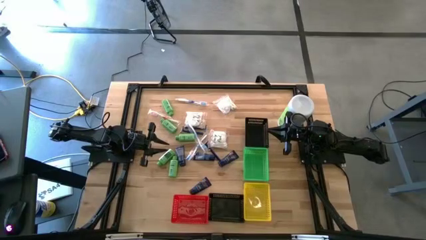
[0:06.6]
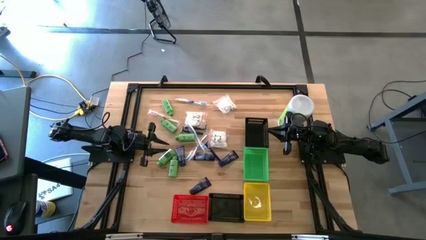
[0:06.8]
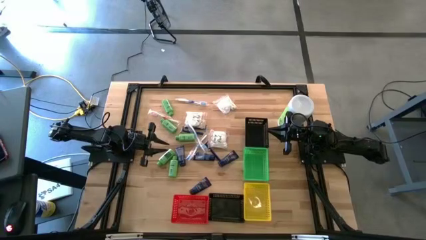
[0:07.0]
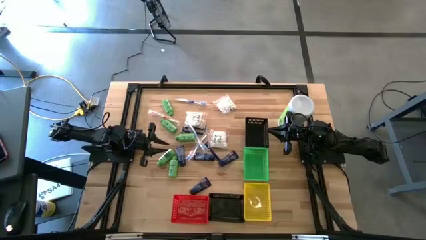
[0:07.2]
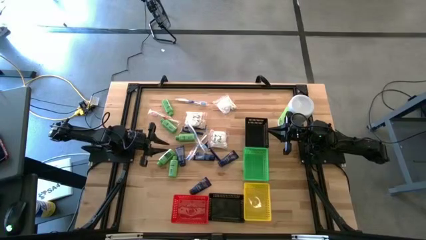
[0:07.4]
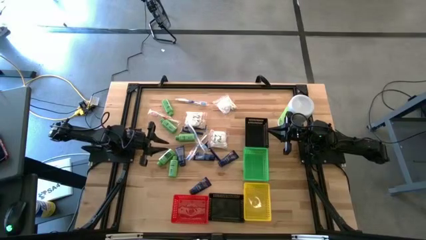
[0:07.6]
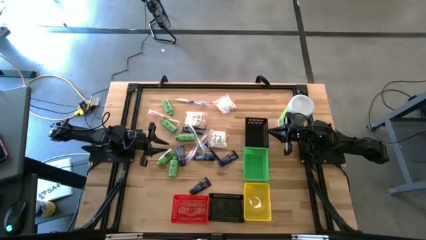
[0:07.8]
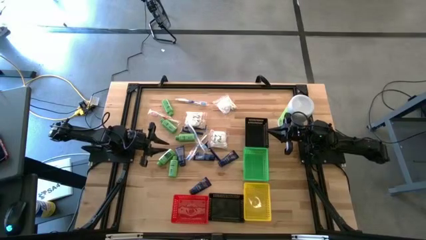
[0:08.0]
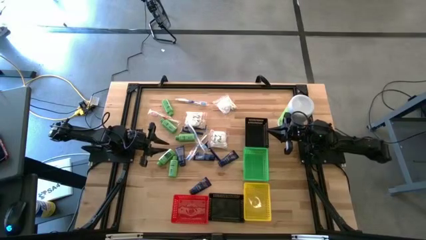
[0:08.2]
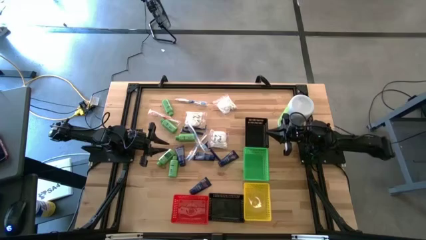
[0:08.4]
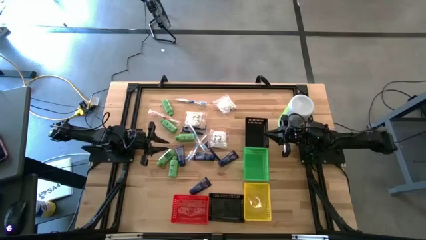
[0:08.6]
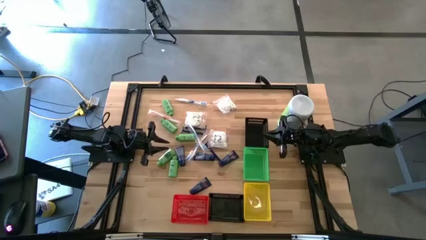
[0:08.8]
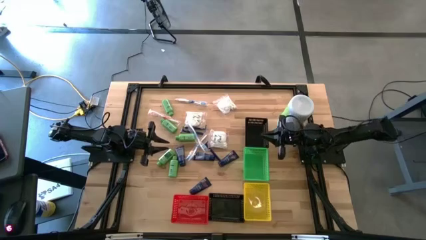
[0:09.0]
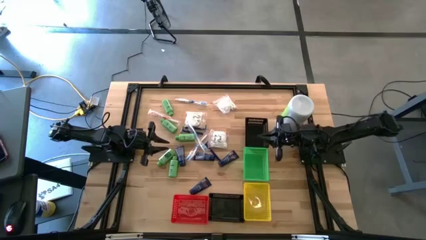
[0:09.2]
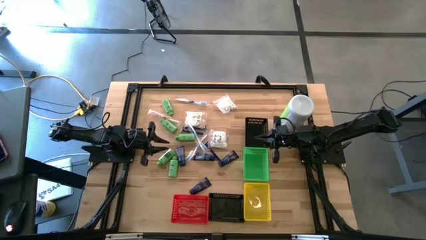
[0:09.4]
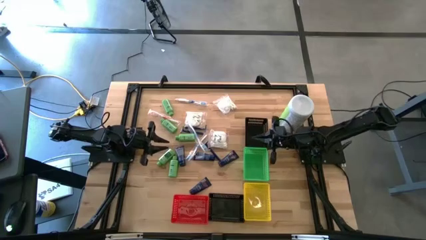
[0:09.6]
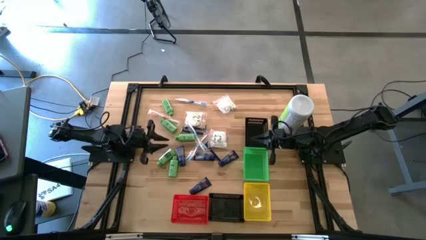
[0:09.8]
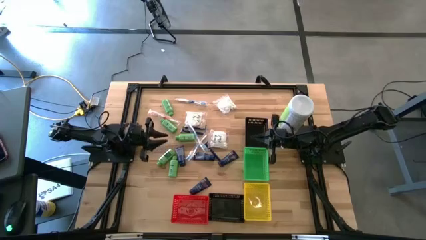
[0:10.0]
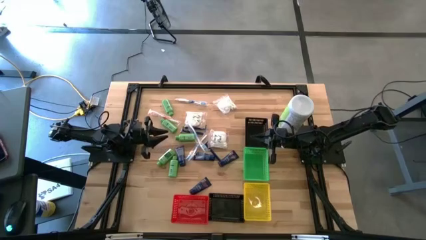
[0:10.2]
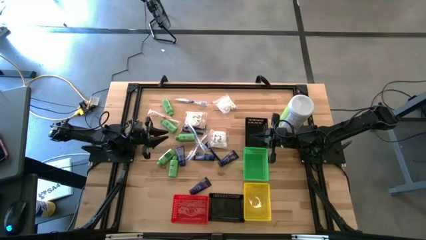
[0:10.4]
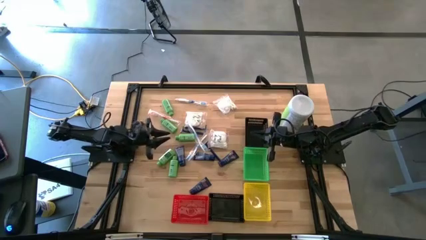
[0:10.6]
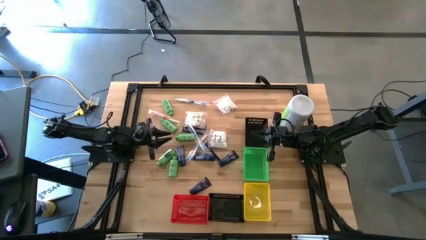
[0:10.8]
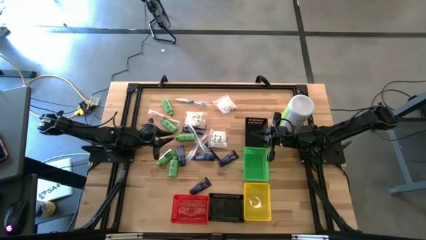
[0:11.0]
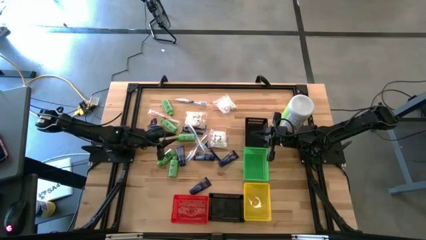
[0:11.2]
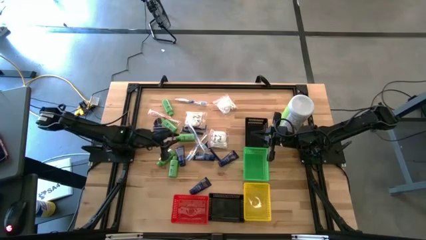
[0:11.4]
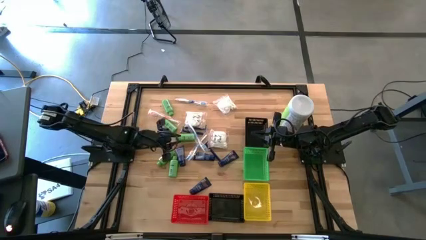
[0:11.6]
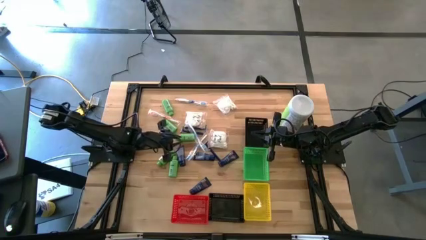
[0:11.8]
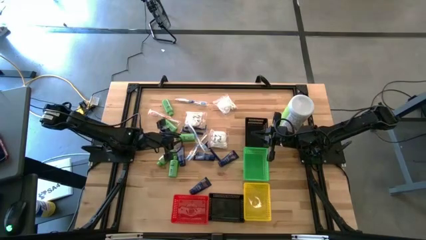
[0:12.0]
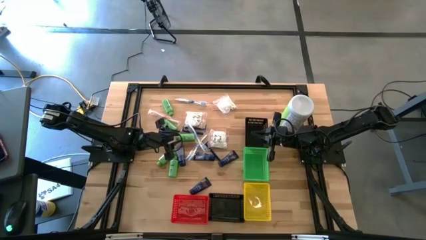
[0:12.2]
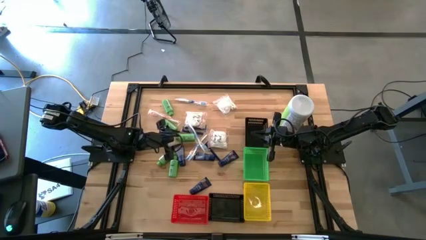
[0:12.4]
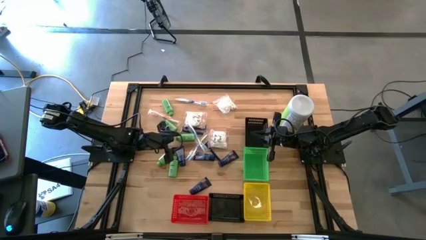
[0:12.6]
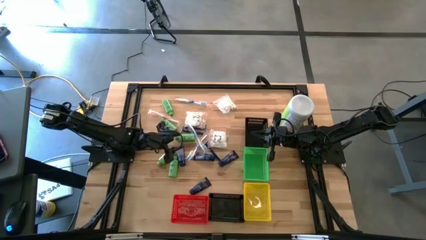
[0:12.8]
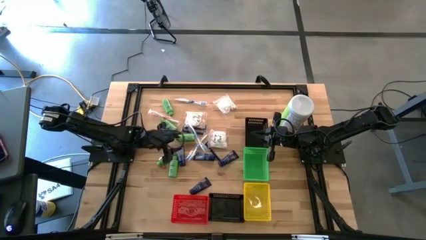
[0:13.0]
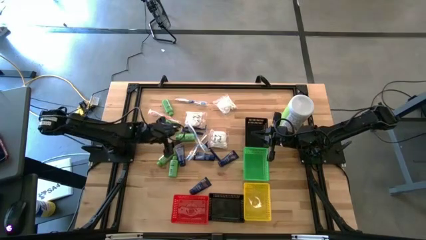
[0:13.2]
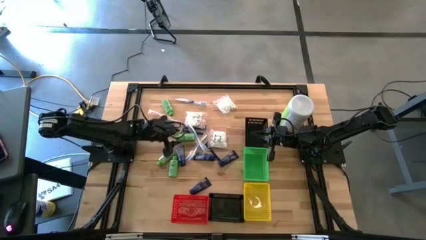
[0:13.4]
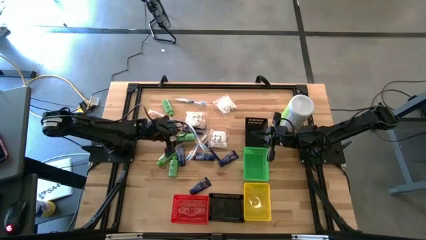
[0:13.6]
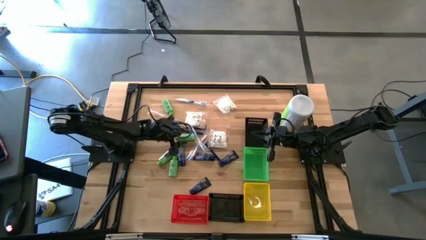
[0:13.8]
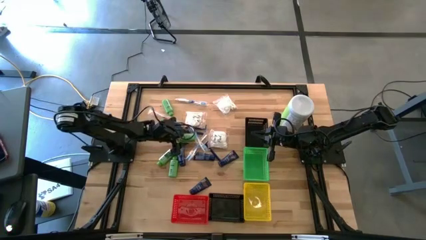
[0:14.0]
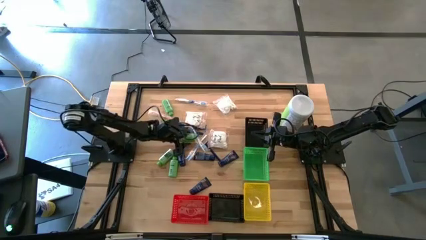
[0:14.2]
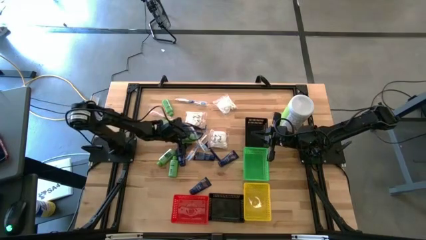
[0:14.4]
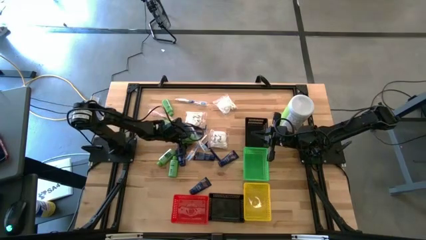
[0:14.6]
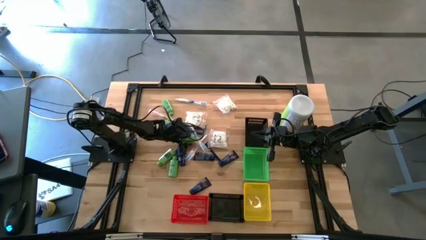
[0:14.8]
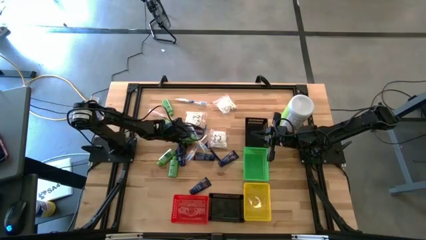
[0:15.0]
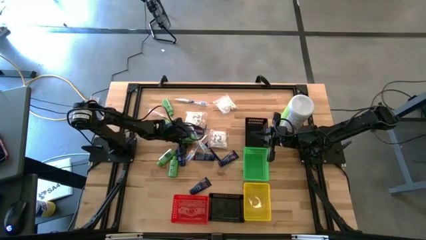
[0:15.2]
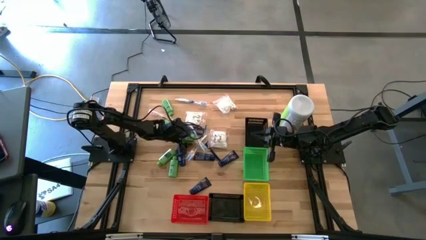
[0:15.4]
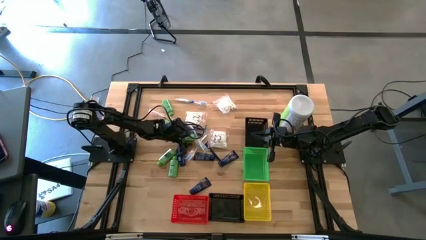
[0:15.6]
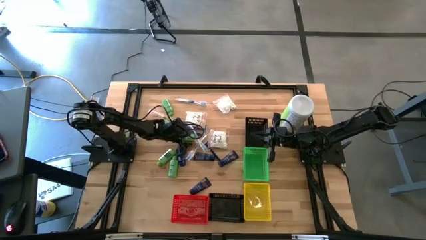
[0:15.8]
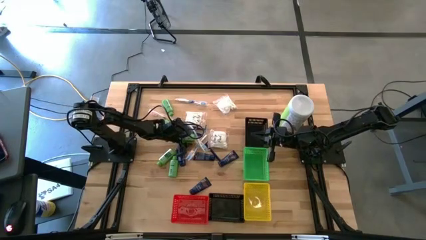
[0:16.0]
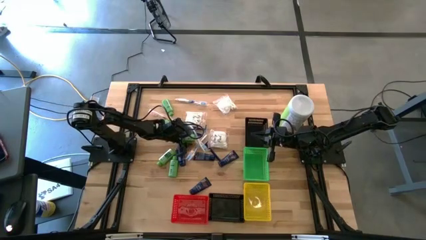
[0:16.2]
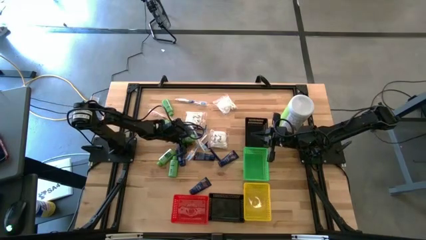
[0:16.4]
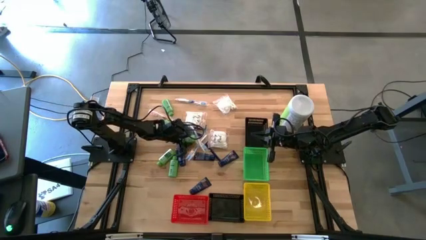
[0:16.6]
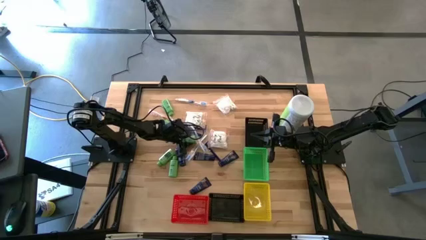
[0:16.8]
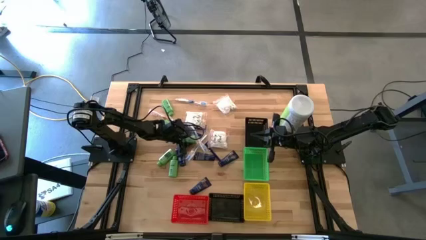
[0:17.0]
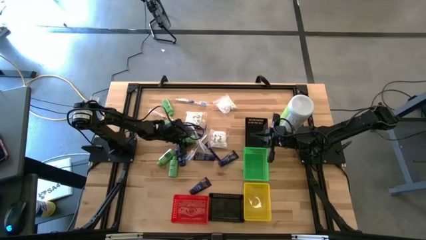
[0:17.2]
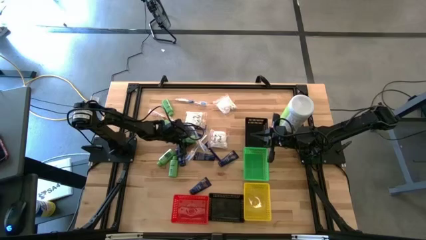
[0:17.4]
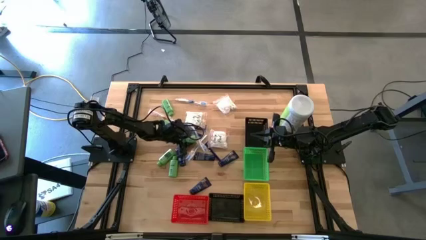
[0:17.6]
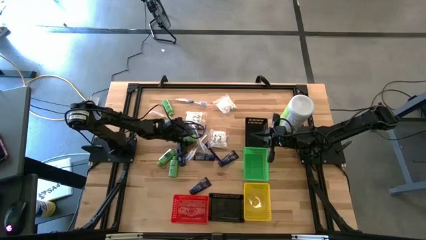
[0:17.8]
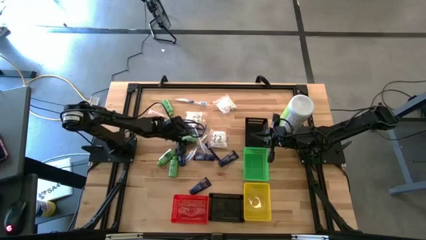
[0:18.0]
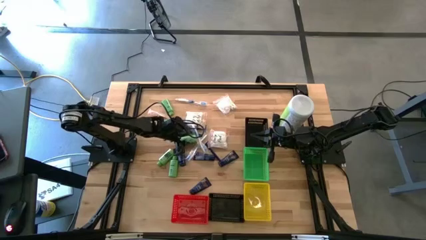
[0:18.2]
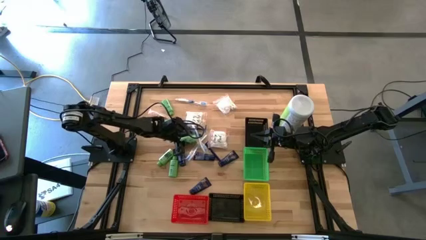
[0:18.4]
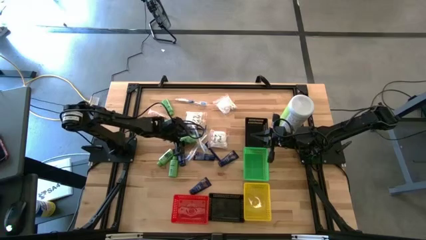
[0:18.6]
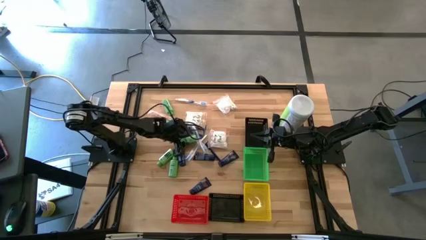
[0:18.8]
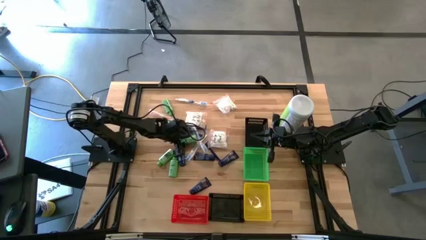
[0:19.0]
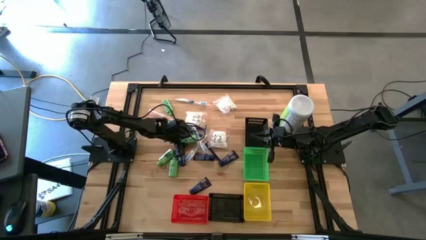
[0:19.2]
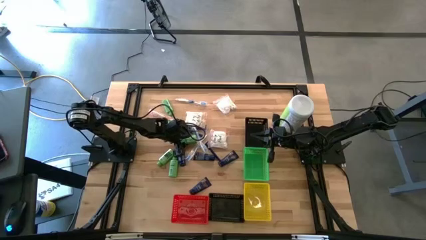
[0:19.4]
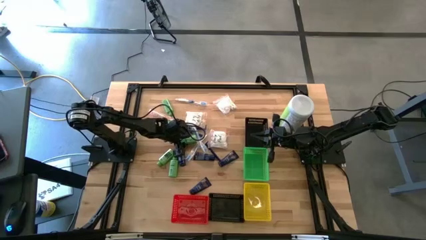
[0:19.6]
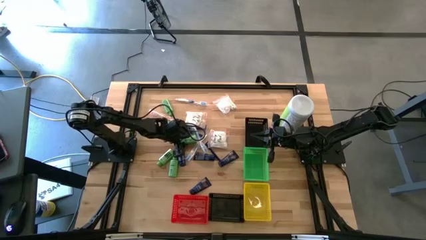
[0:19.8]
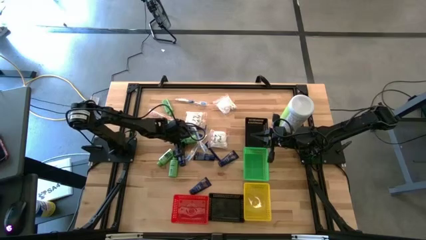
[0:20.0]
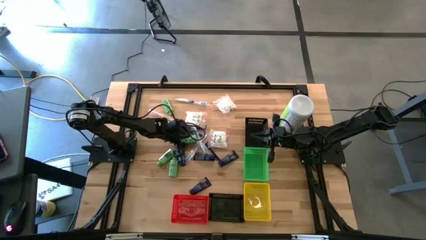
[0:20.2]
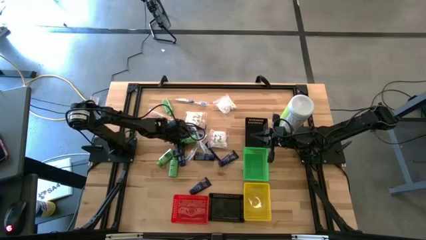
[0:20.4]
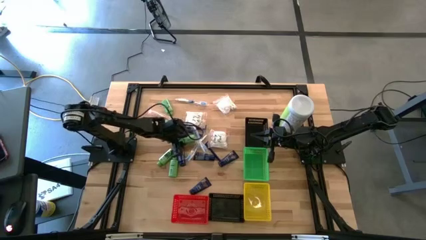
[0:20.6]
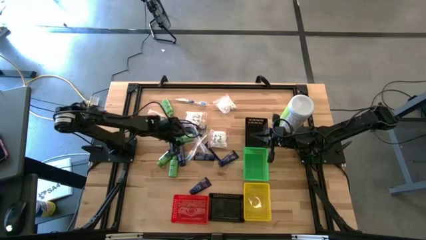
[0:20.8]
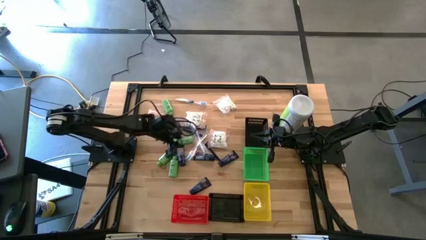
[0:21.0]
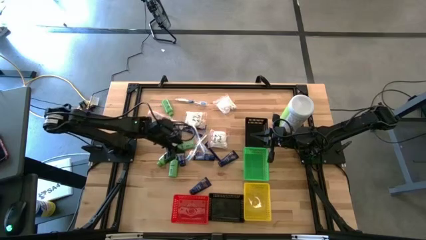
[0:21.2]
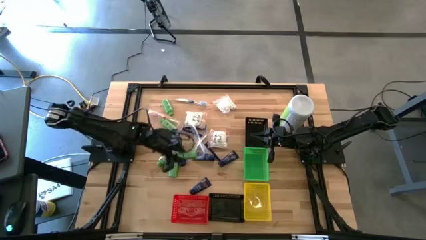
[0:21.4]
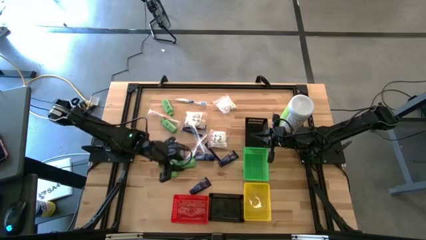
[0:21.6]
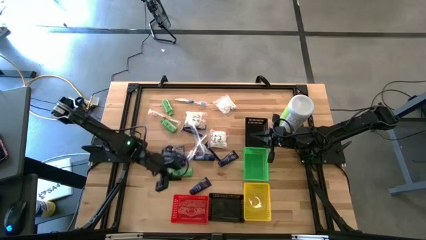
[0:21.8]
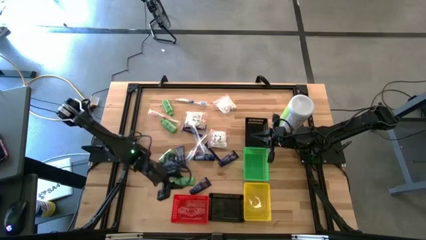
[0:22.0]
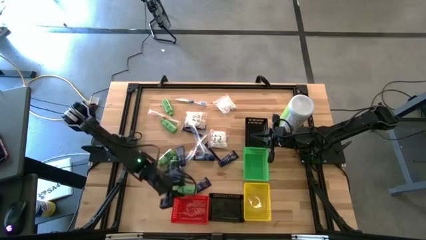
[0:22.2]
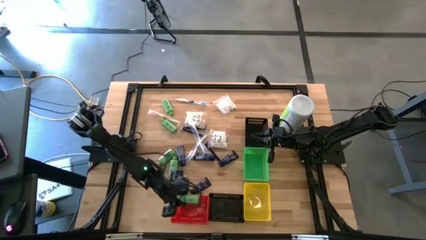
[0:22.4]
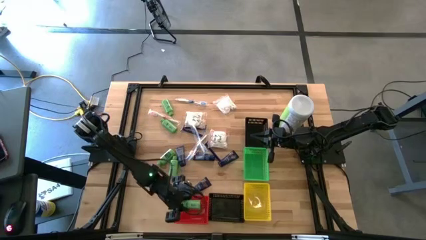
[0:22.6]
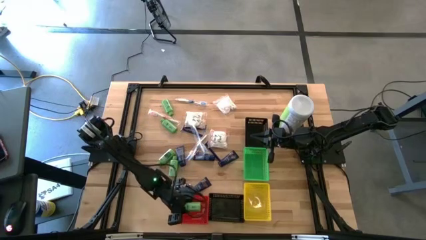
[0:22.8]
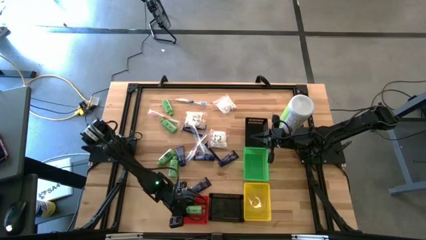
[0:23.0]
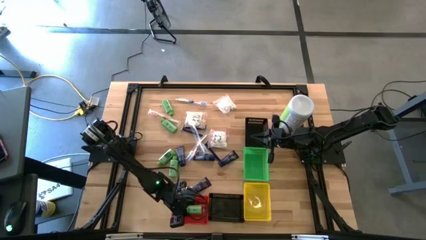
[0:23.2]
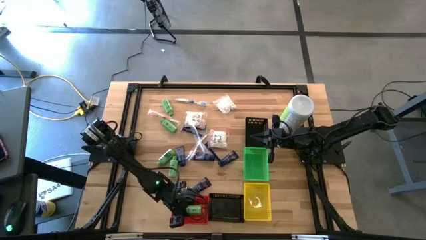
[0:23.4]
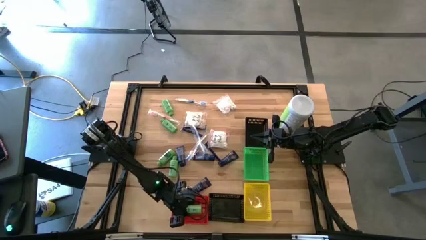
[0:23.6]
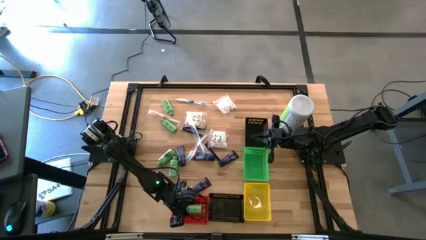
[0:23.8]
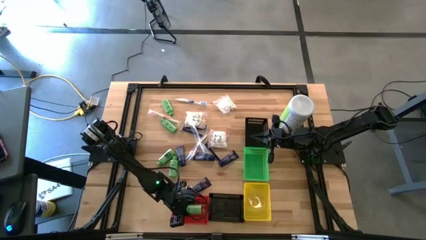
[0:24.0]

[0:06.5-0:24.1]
Task: Pick & Place Travel size toiletries
Put the green shampoo bottle into the red bin
